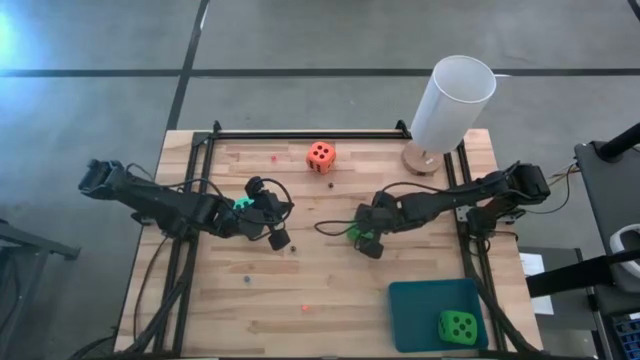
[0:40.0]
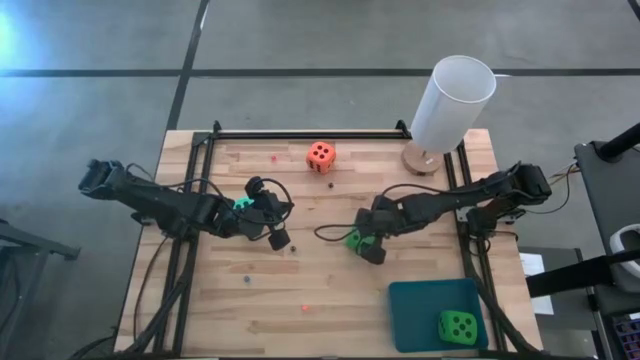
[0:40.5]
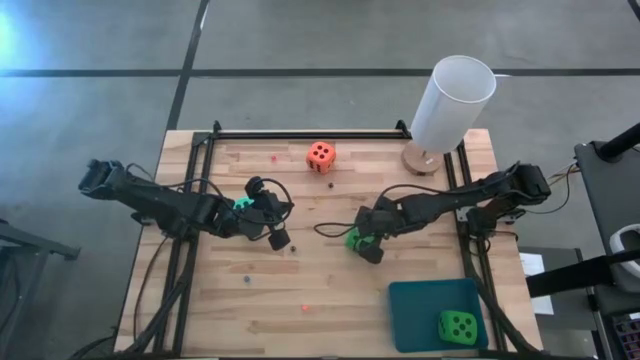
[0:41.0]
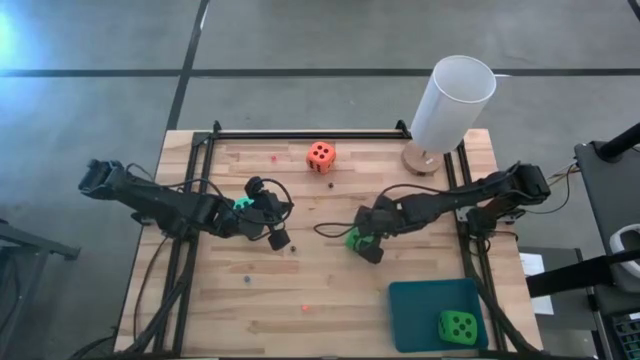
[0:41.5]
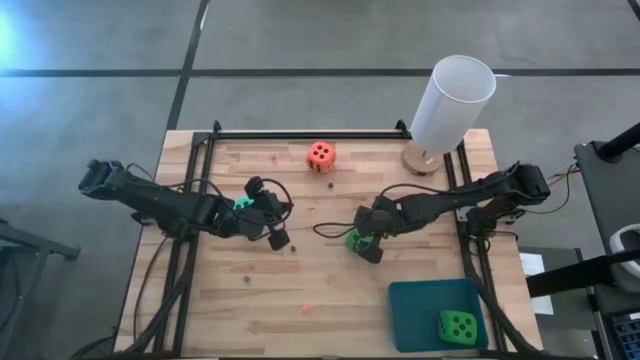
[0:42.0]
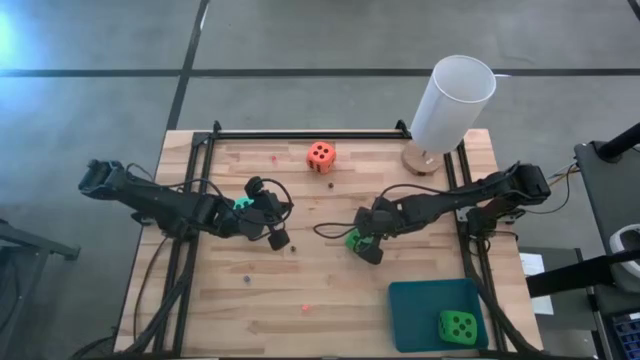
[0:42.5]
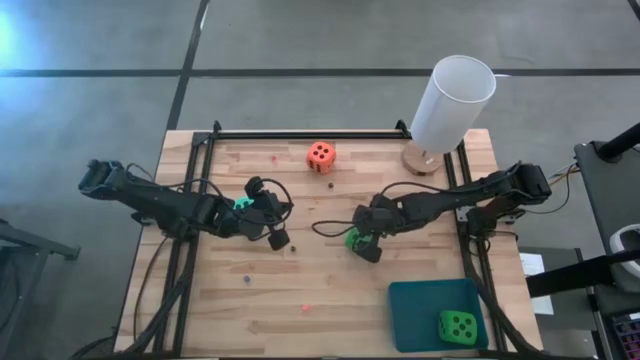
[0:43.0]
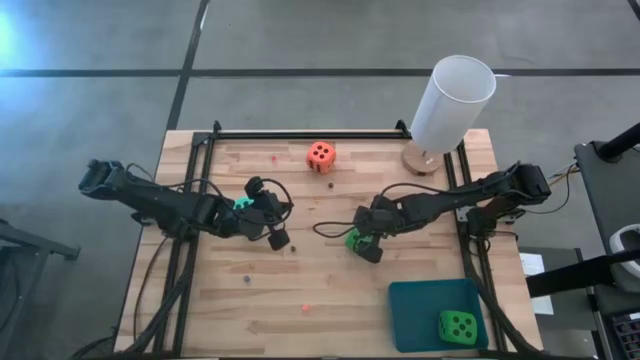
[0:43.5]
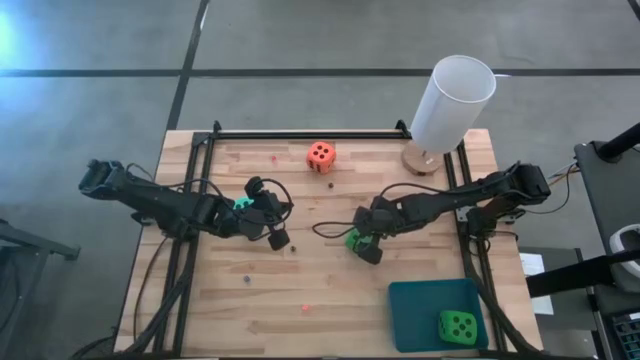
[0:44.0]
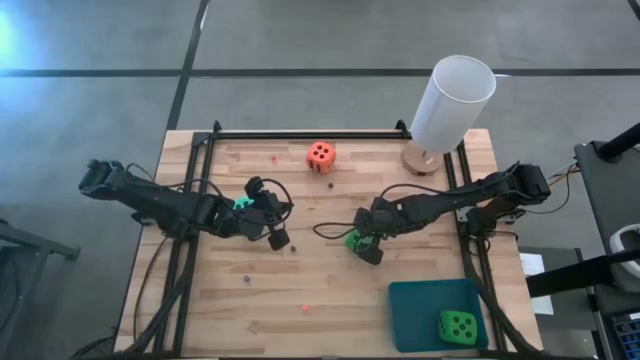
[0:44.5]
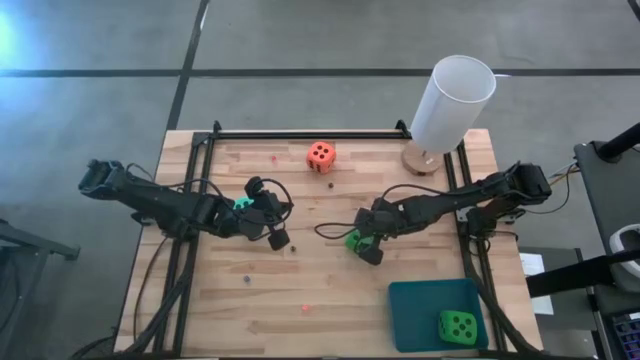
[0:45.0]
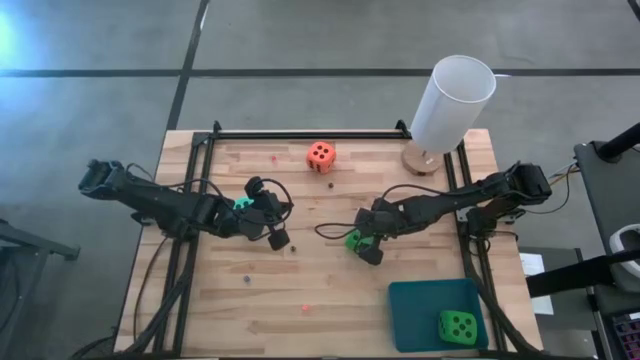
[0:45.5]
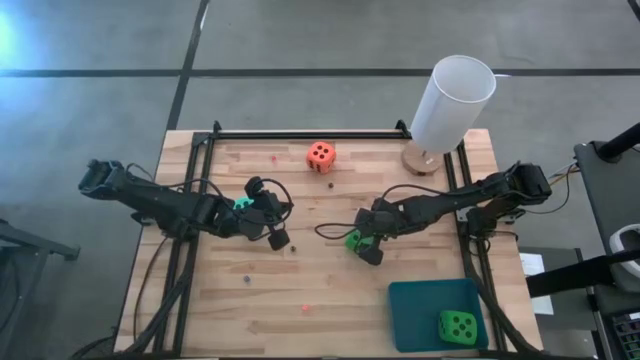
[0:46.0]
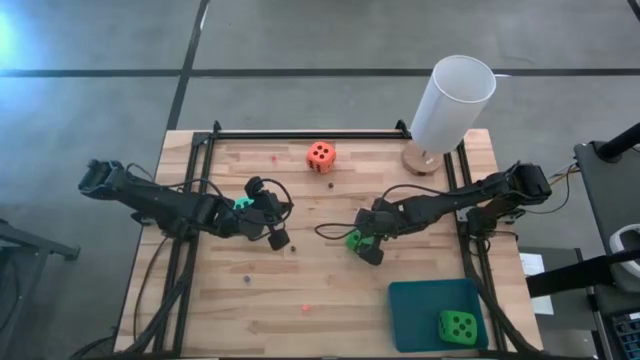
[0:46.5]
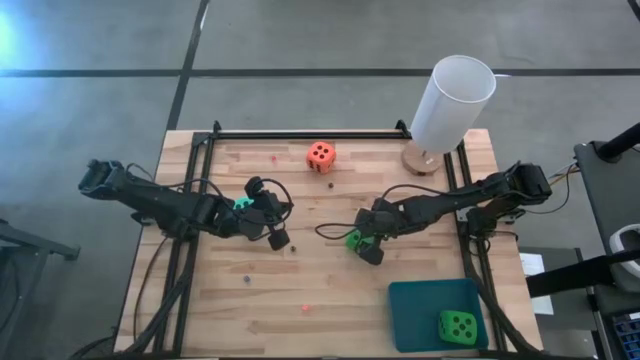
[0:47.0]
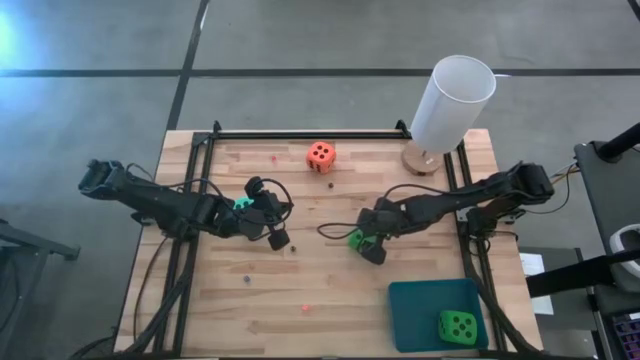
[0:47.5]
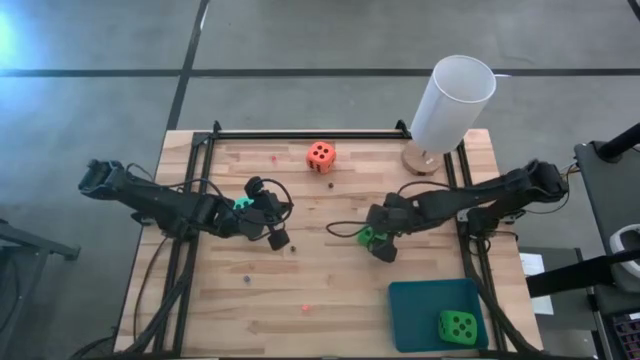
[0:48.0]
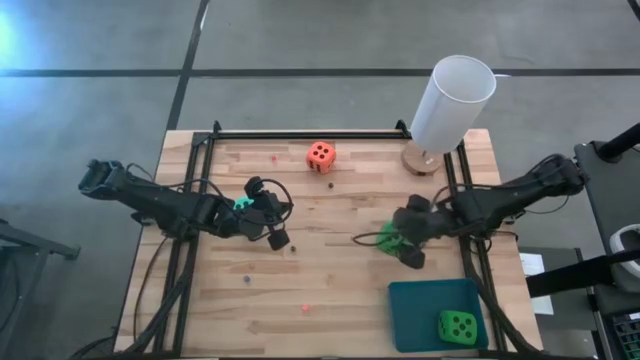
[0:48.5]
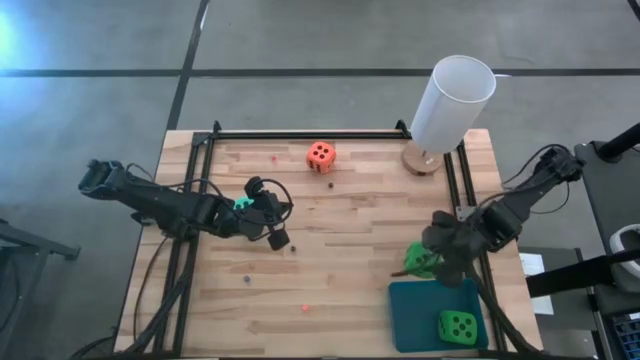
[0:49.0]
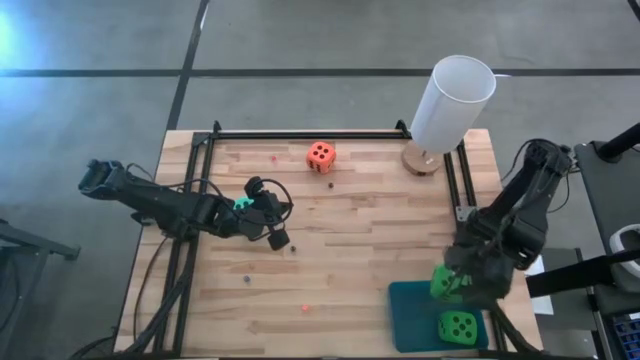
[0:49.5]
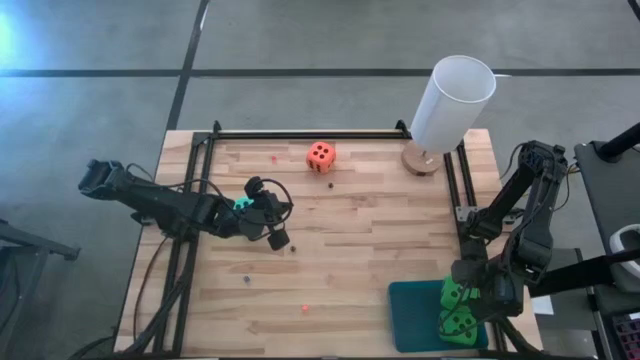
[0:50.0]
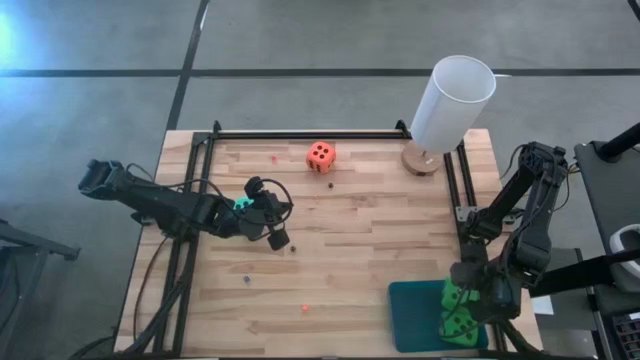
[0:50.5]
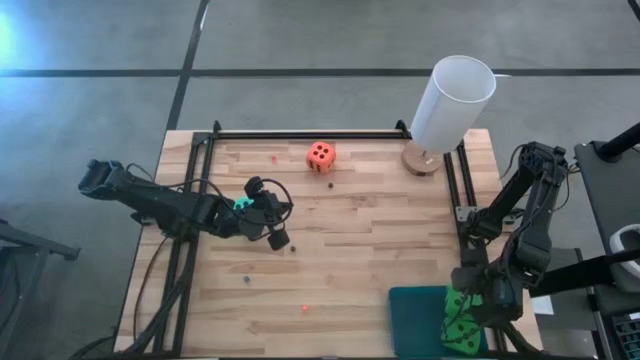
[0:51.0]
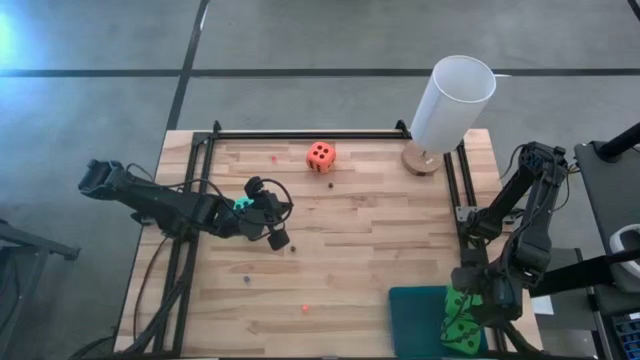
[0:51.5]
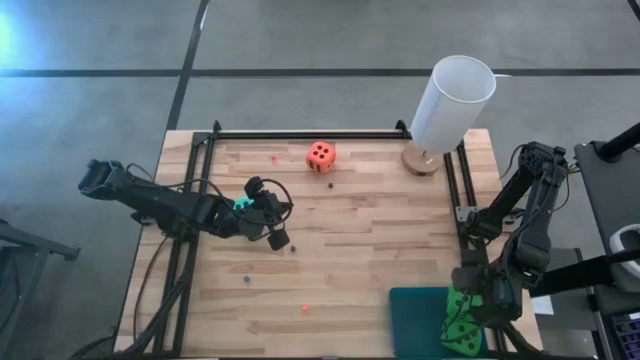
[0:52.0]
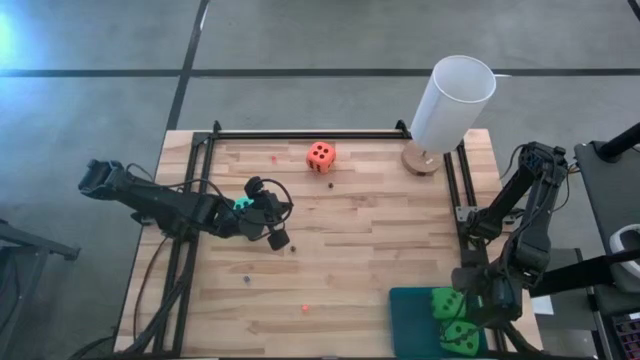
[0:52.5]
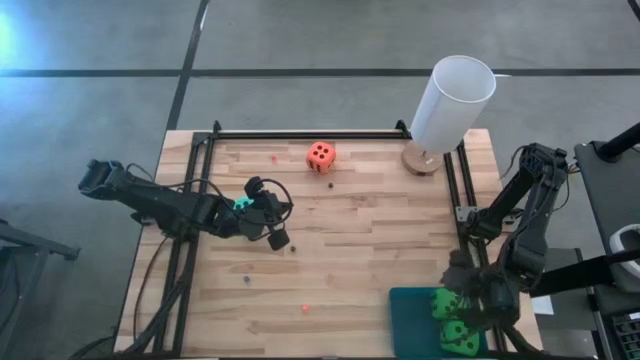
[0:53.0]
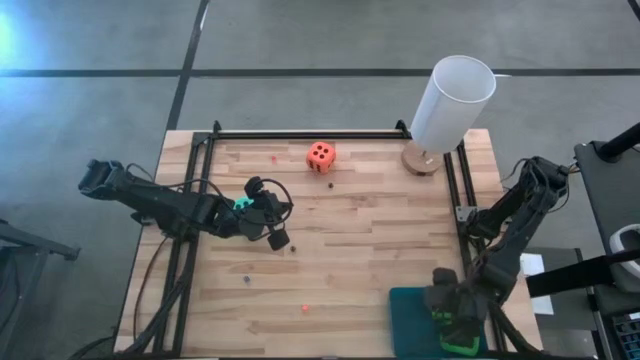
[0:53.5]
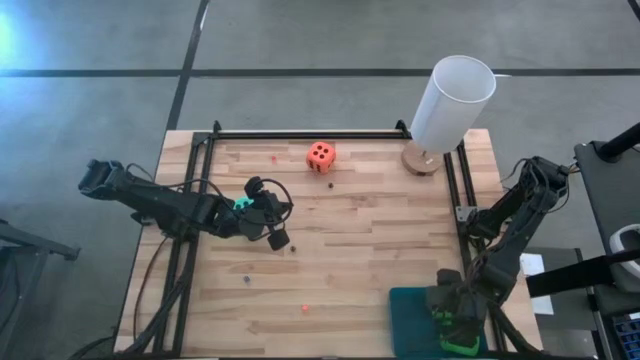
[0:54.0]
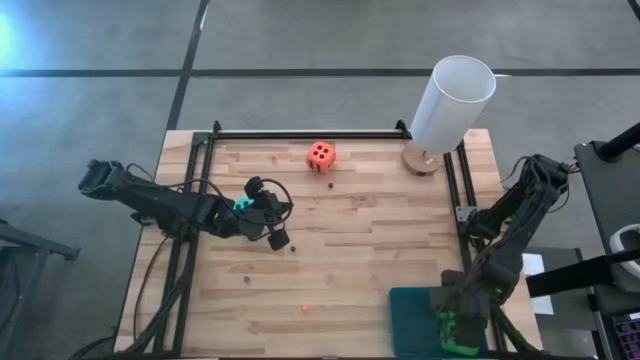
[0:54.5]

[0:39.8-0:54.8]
Task: Pick & Place Dice
Put the large green die into the blue bin

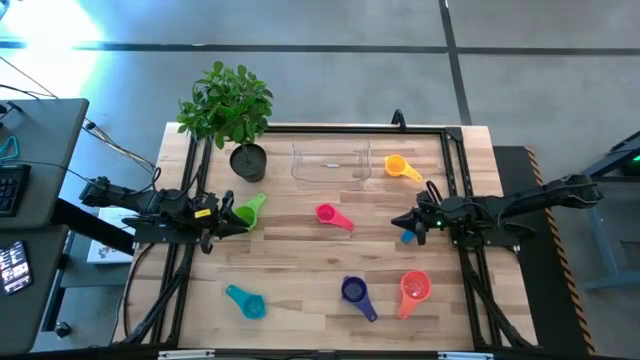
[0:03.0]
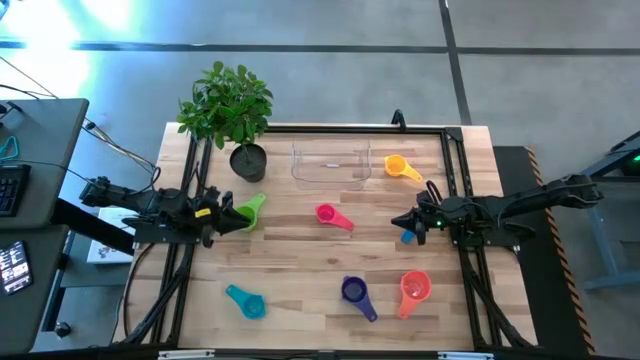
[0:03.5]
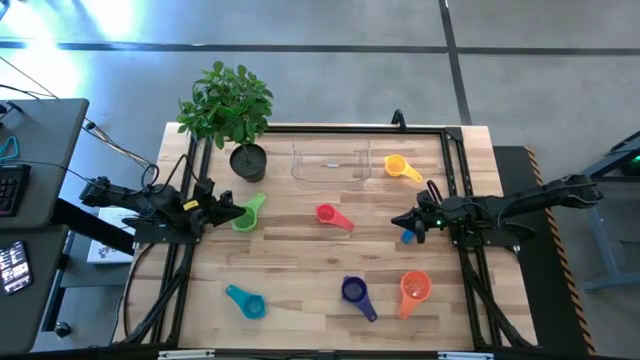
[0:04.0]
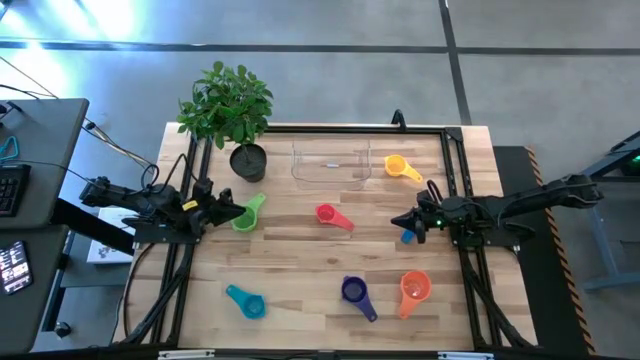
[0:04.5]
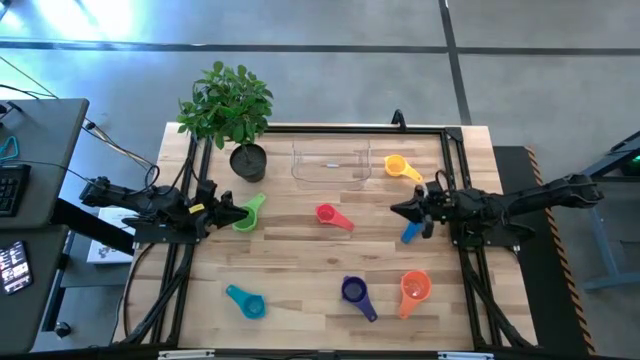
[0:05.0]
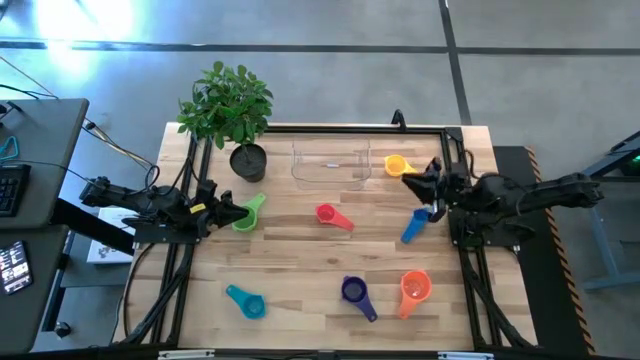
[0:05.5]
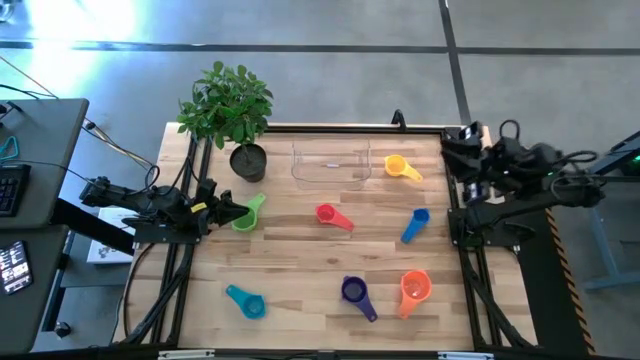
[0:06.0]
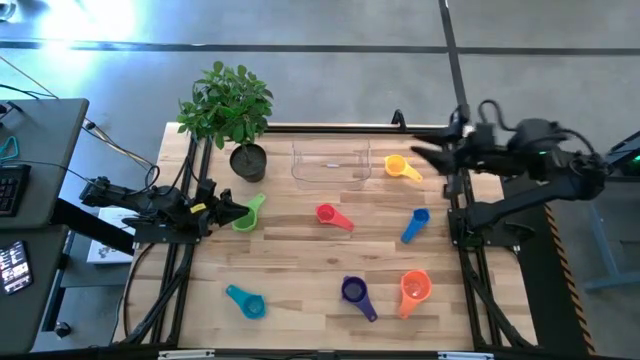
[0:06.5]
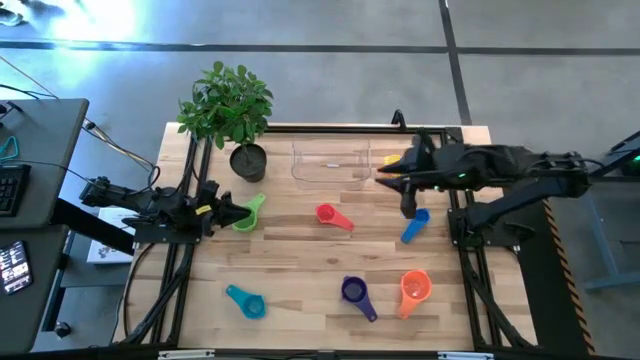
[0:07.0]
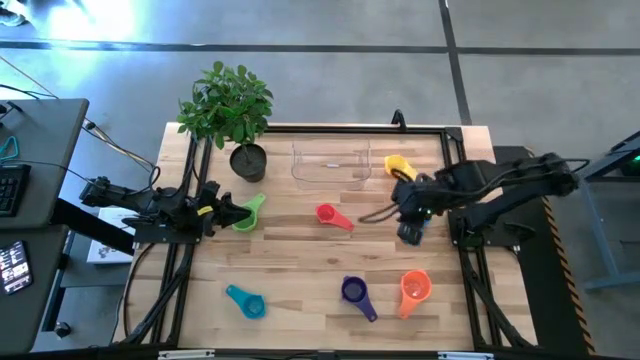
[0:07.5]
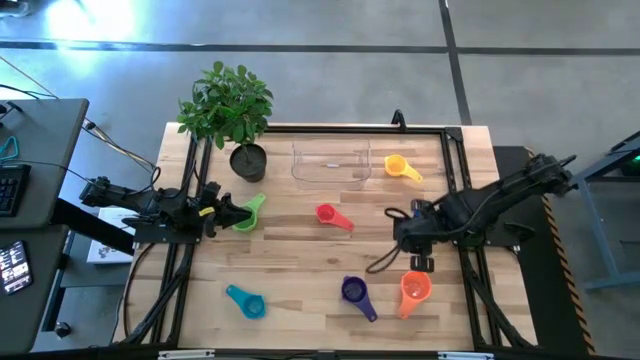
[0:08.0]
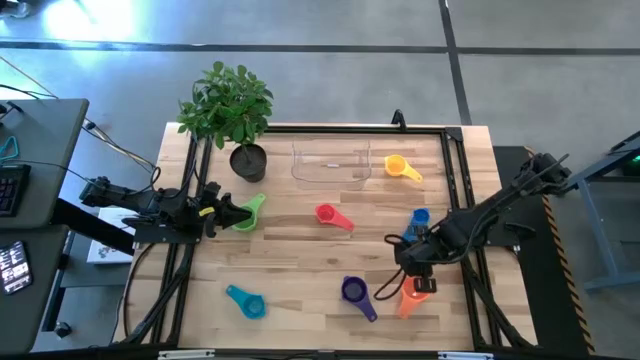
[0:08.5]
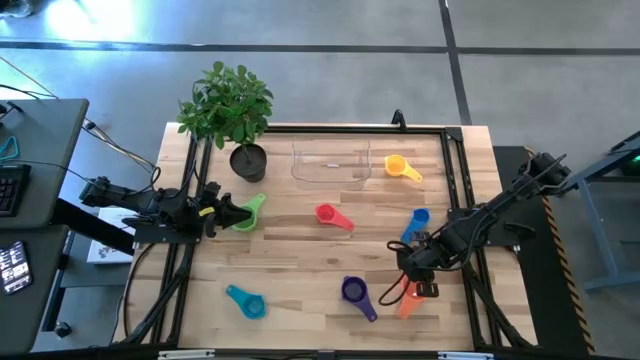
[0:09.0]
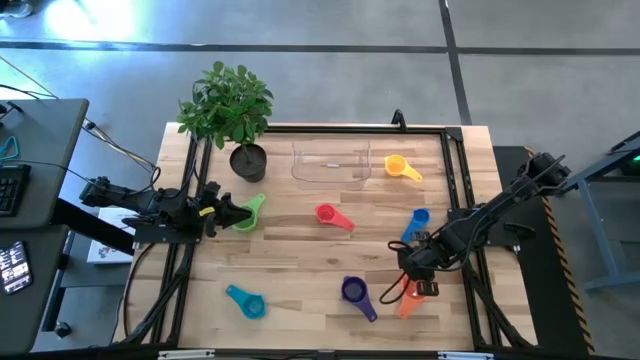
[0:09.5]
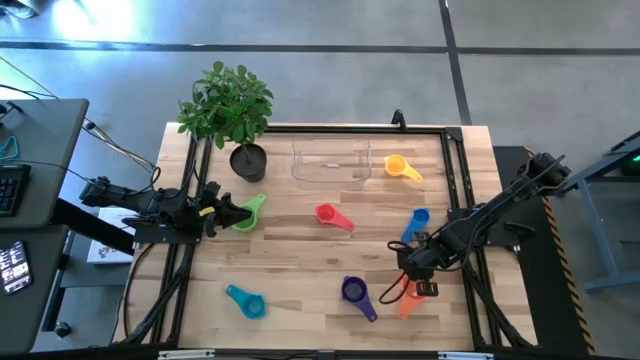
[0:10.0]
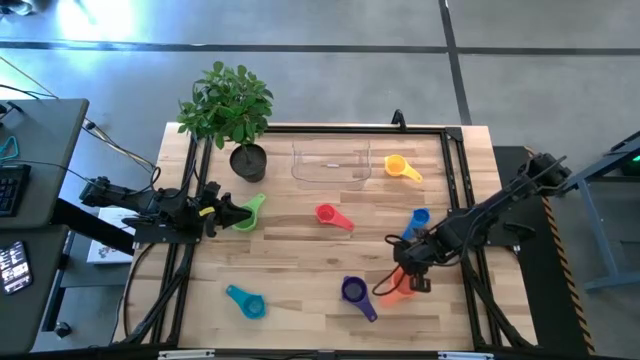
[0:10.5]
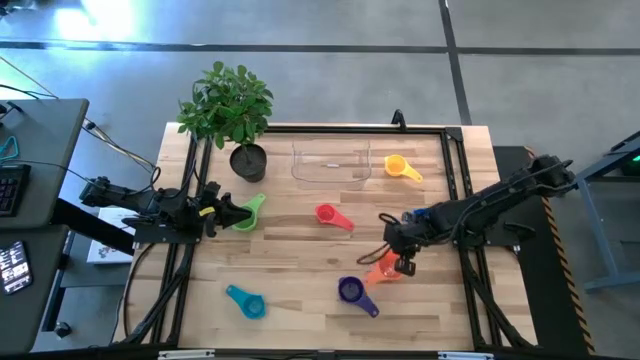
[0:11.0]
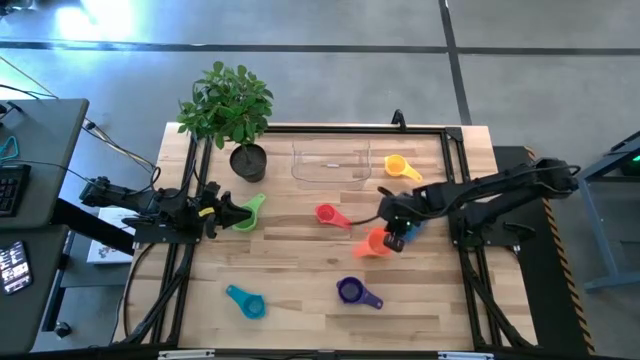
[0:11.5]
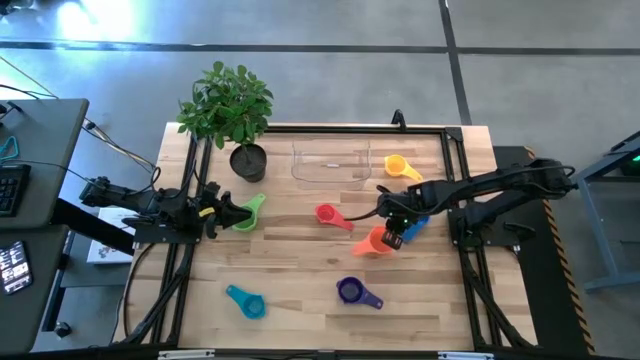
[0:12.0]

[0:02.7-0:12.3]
Task: Nest measuring cups in basket
Move the orange measuring cup to the center right of the table
